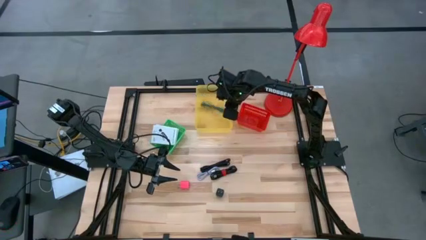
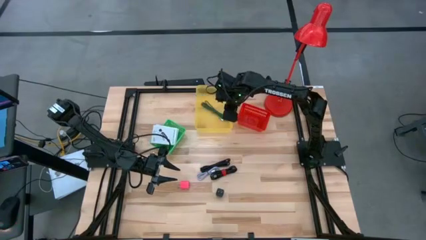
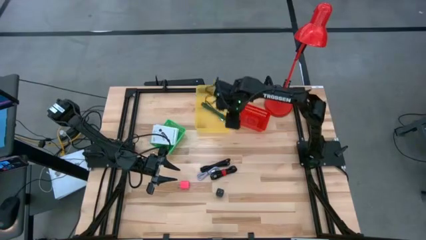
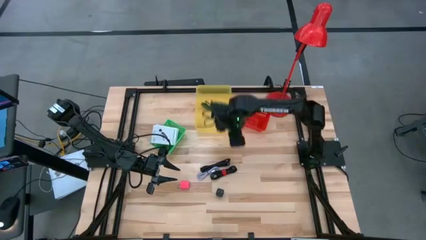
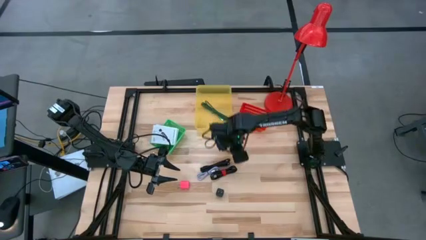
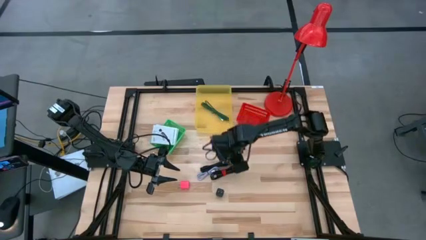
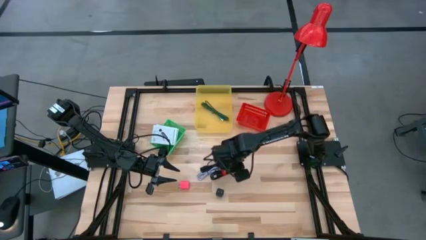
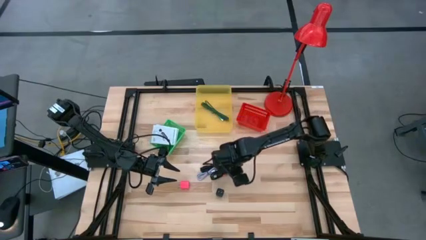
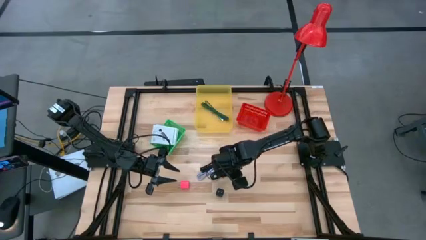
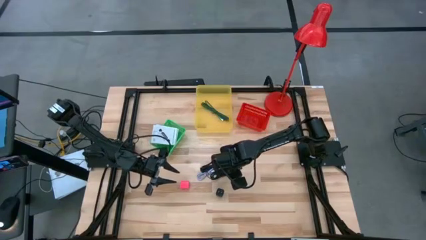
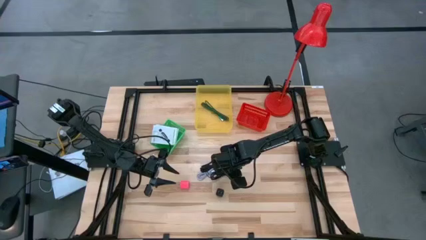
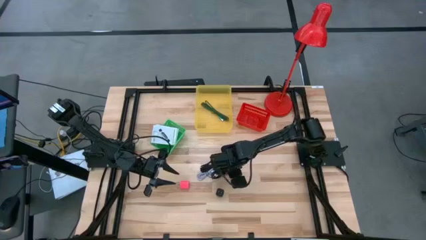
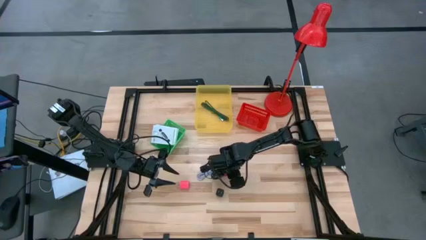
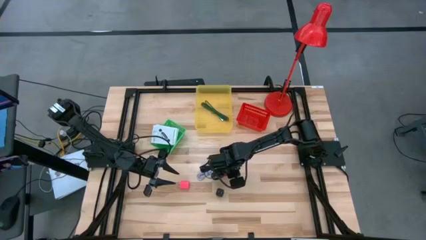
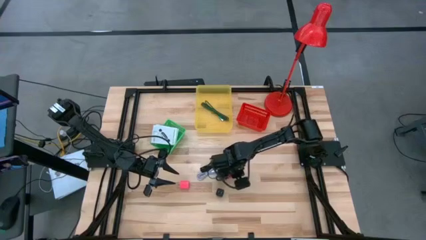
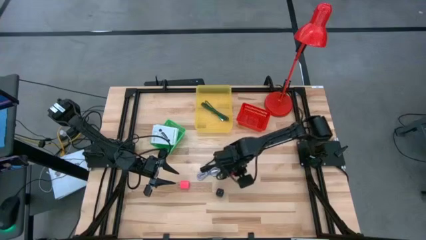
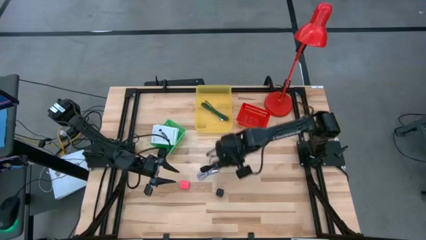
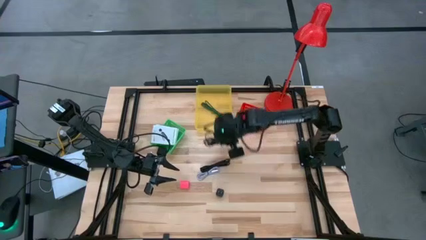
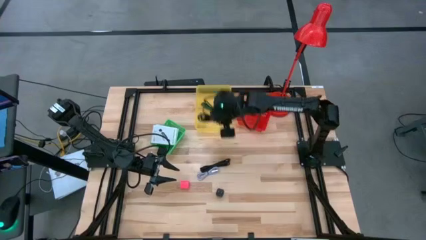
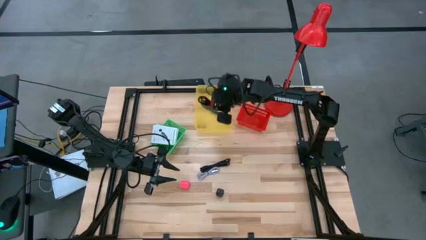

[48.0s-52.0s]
Task: Pick and place items into bin
Put the black charger cable into the yellow bin

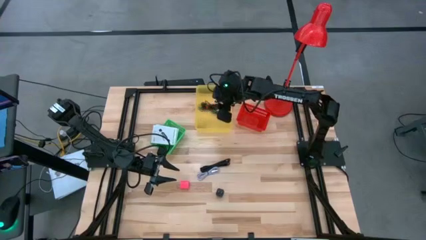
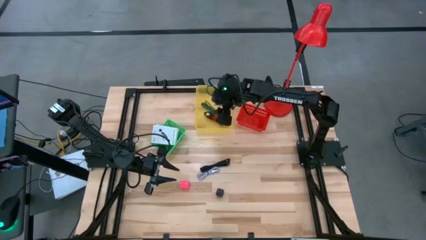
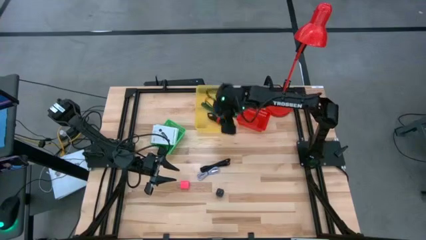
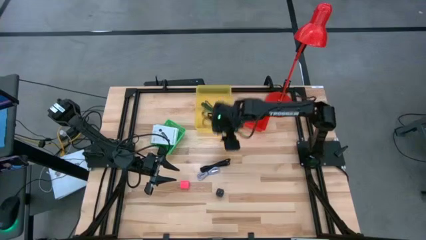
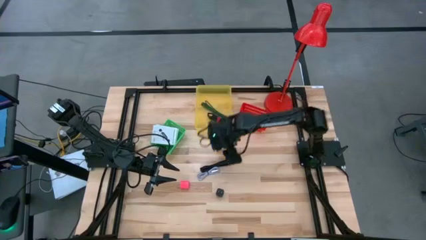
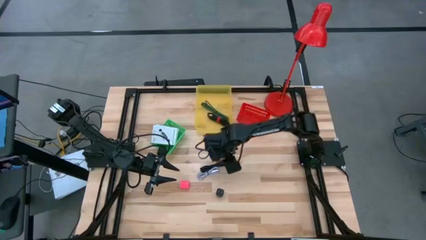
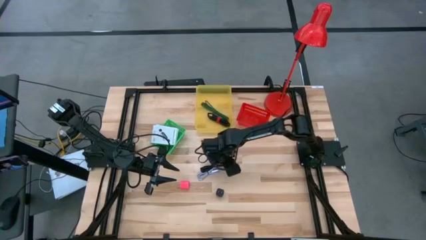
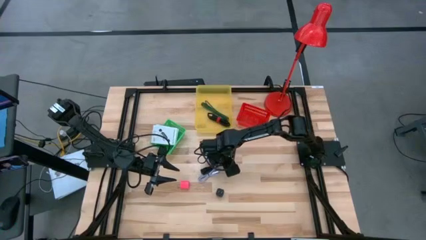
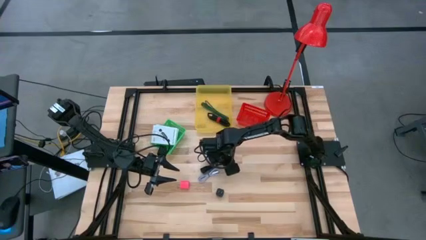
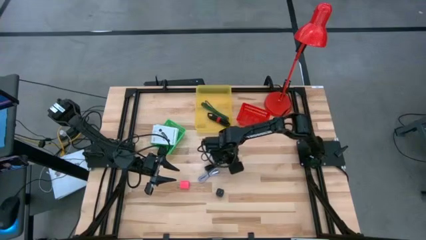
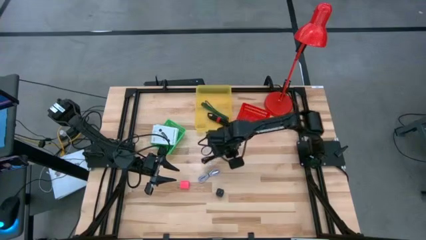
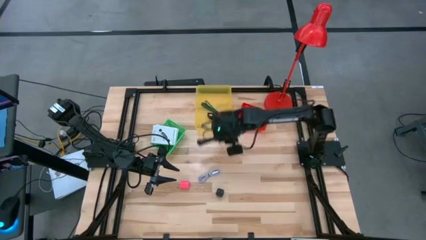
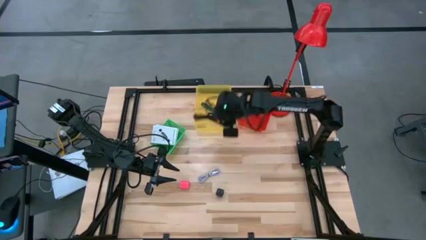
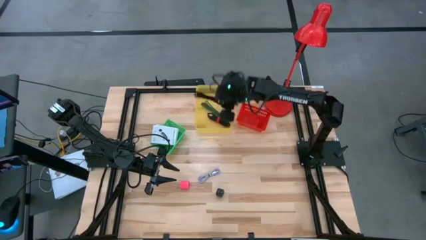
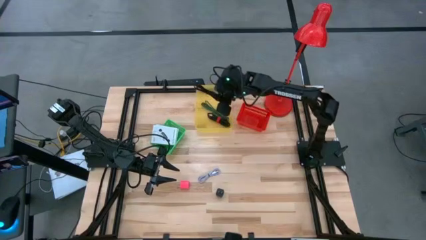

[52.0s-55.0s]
Put the black charger cable into the yellow bin

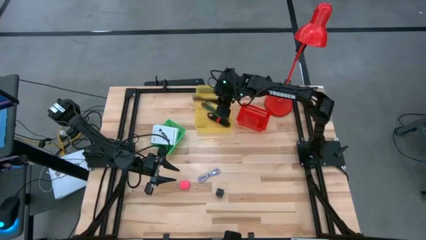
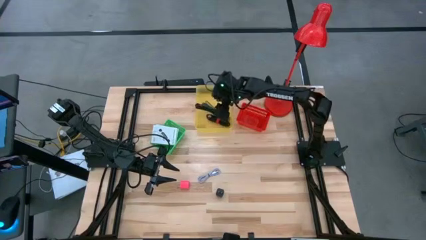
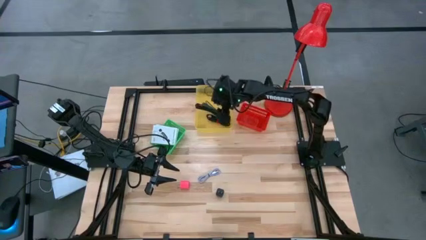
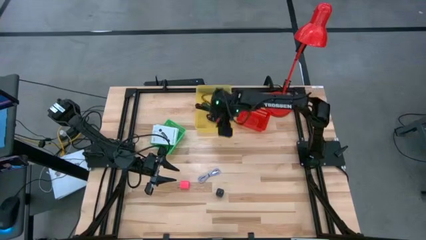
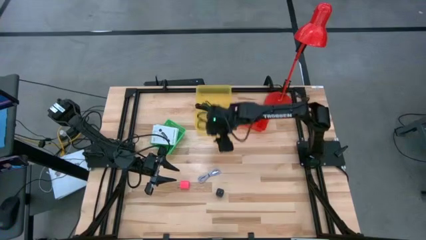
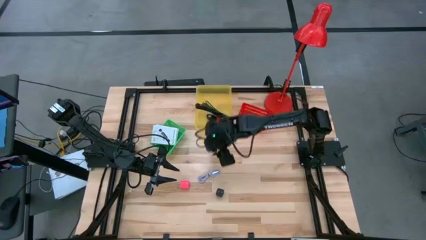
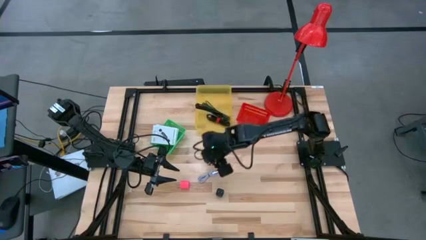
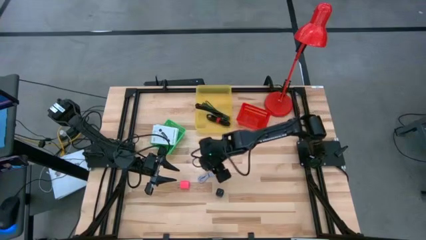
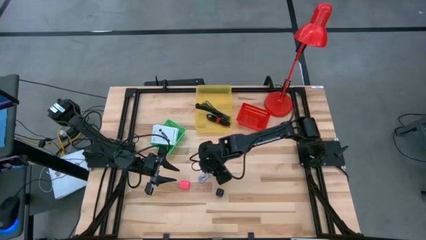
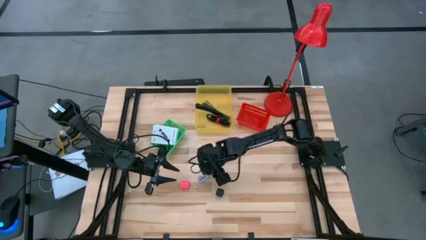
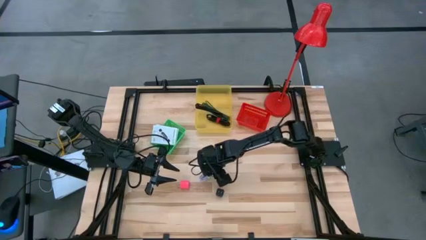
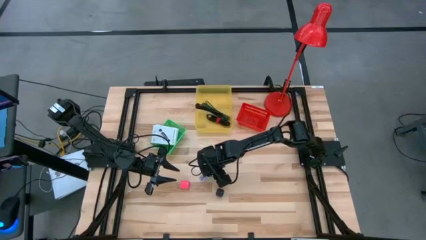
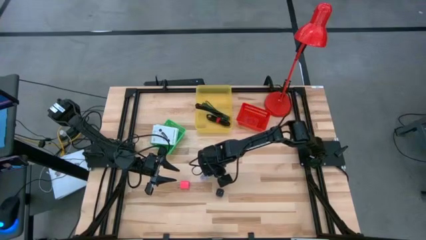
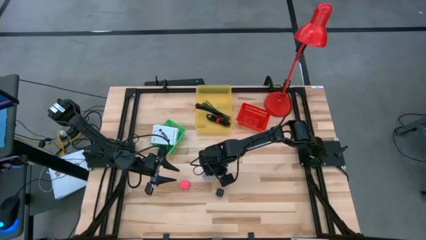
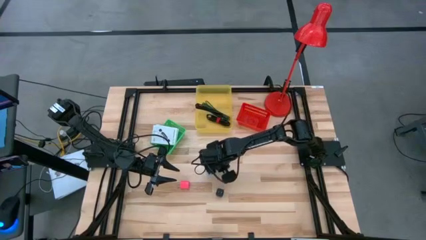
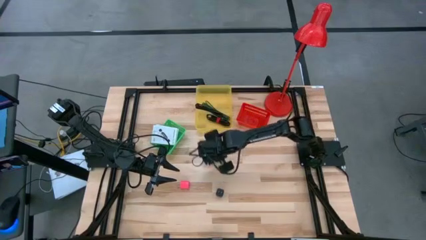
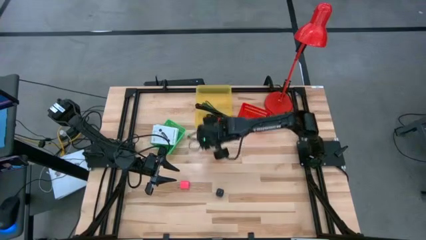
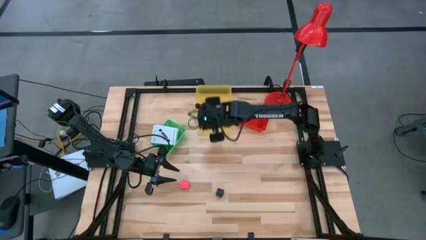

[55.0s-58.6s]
Put the white charger cable into the yellow bin

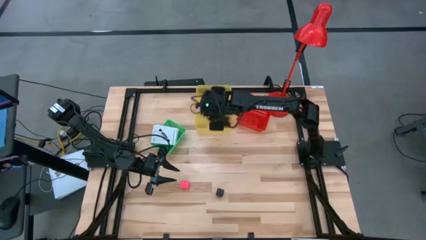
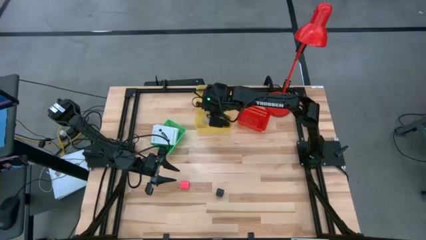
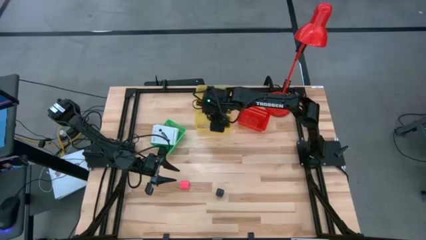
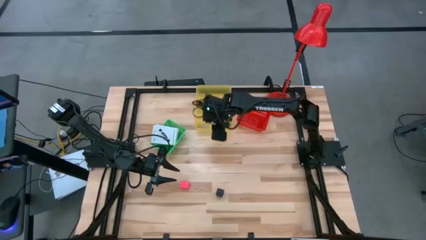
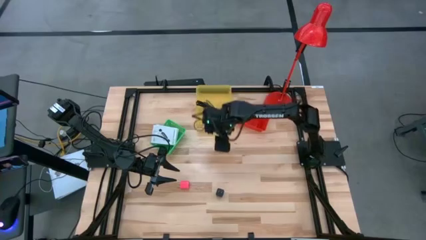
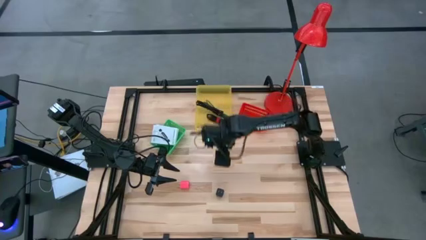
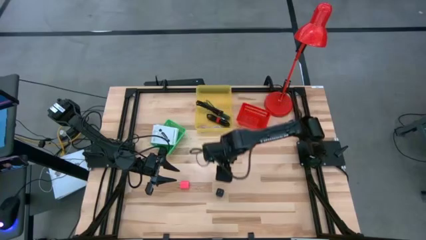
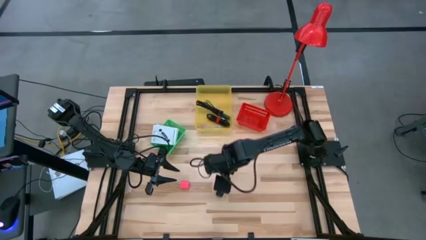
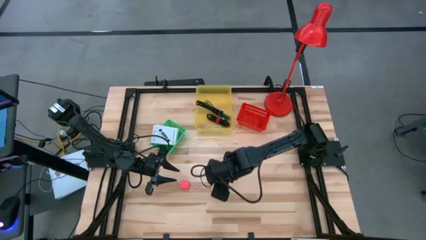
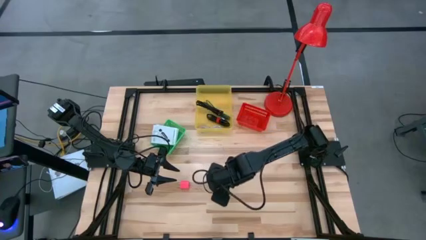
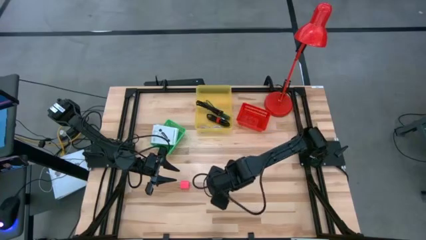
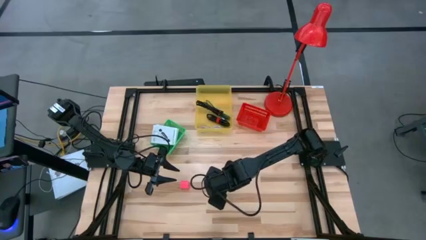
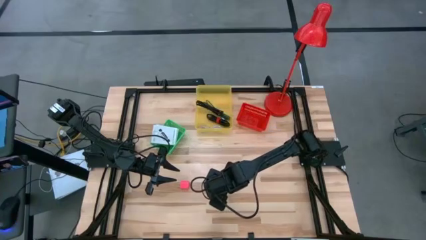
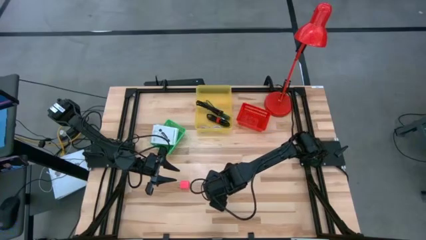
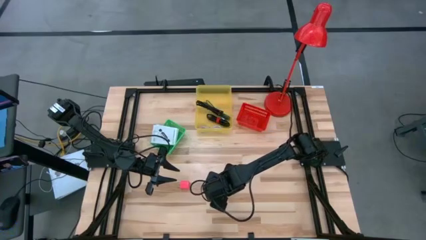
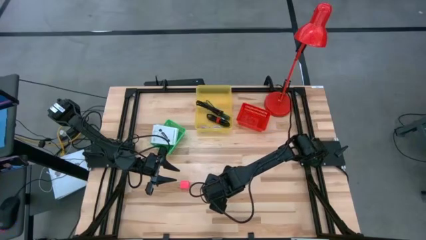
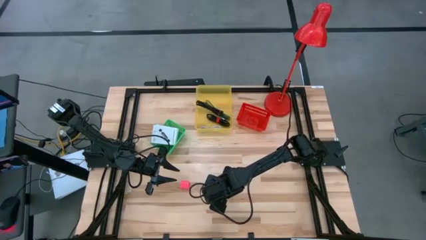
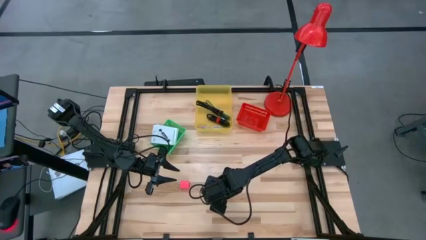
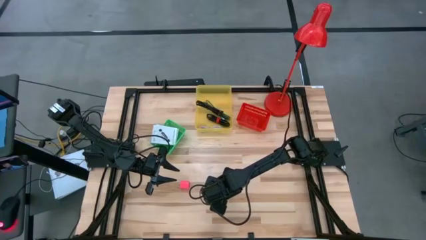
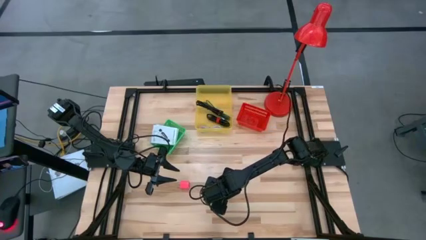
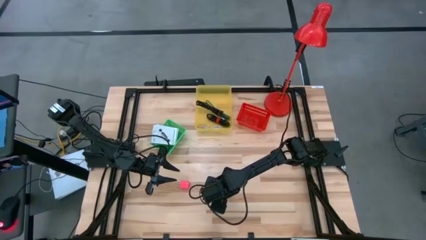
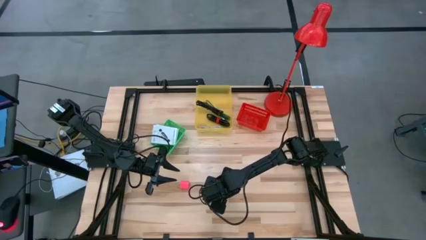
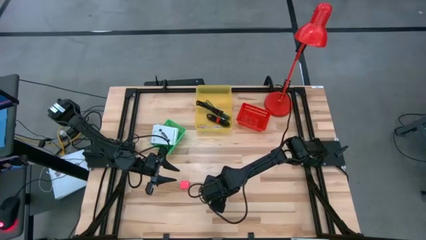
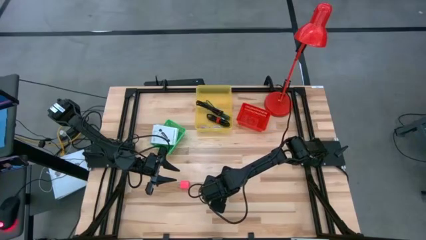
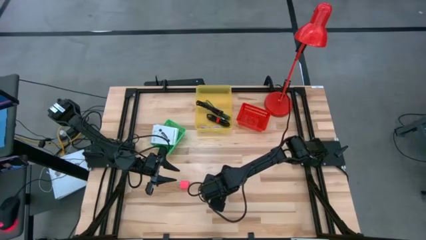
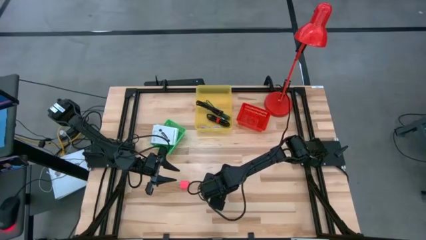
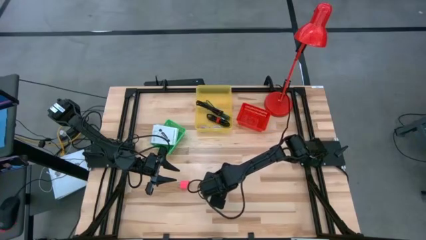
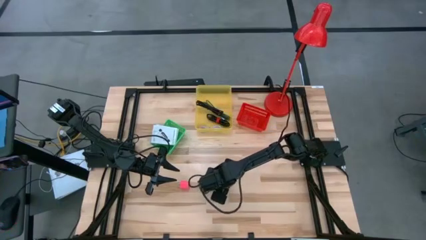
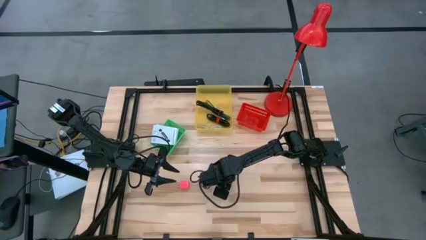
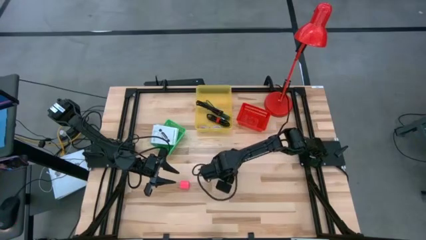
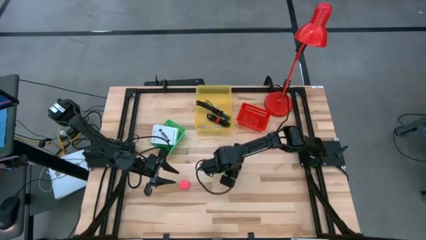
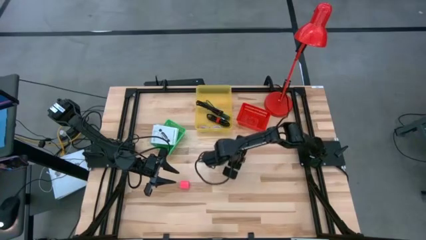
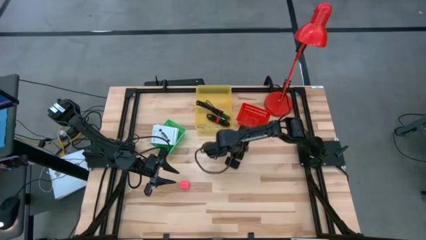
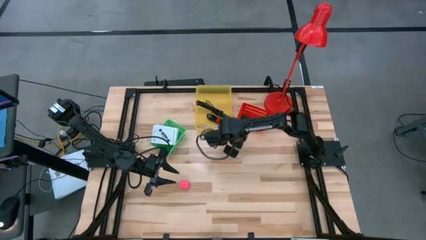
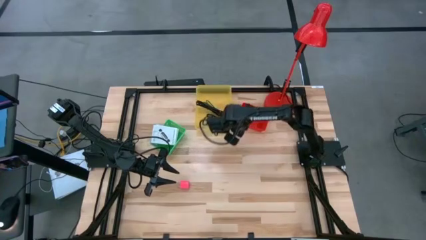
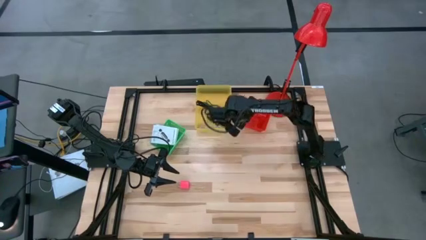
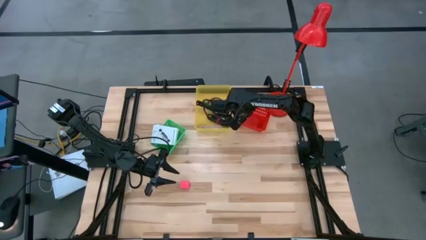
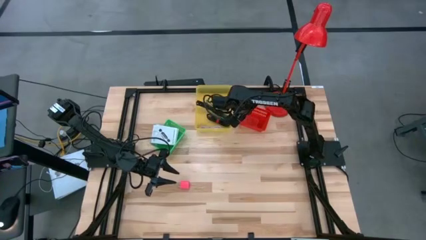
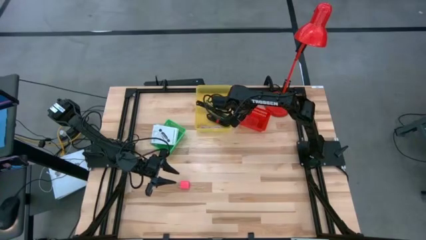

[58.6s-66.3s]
Put the black charger adapter into the red basket
